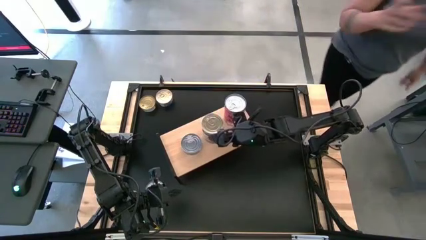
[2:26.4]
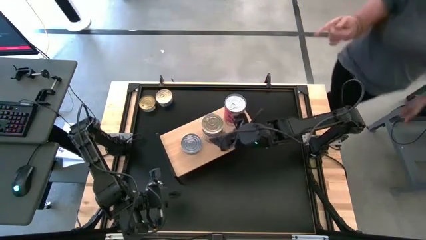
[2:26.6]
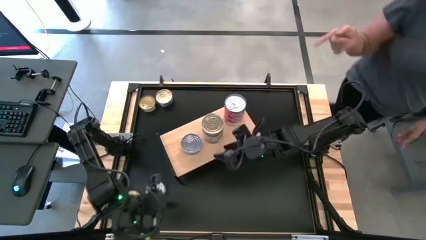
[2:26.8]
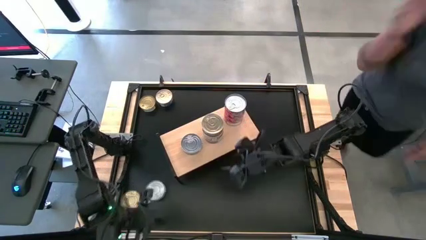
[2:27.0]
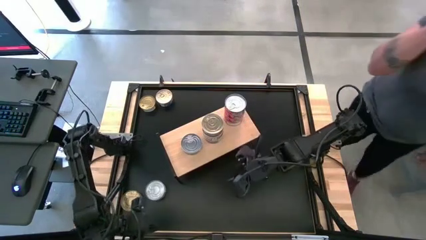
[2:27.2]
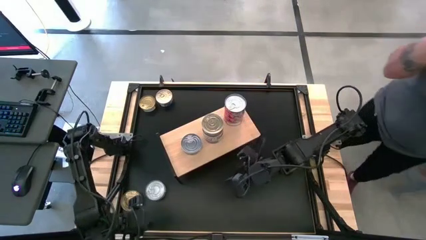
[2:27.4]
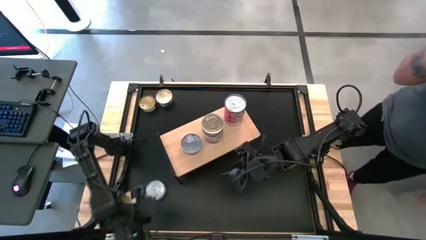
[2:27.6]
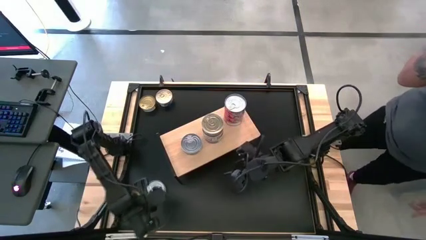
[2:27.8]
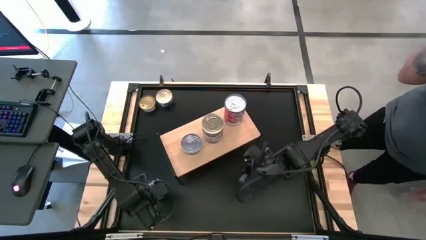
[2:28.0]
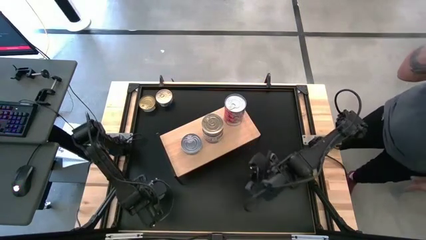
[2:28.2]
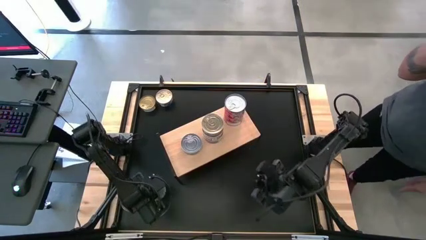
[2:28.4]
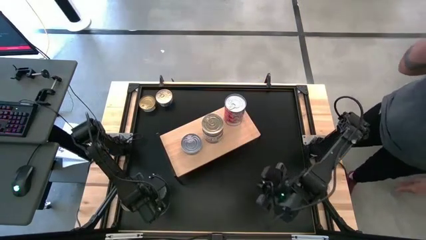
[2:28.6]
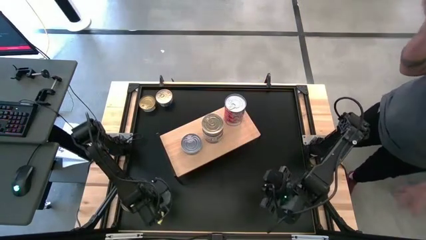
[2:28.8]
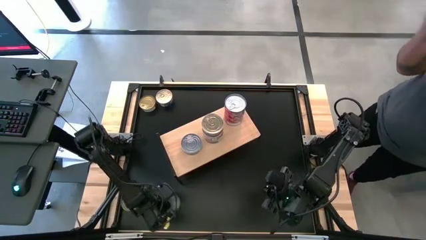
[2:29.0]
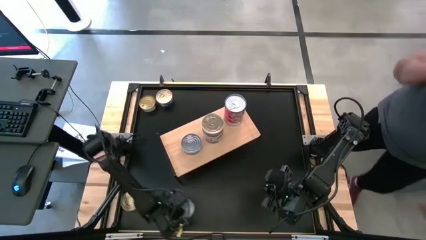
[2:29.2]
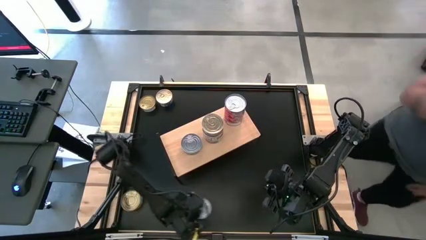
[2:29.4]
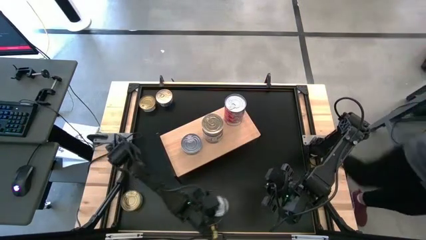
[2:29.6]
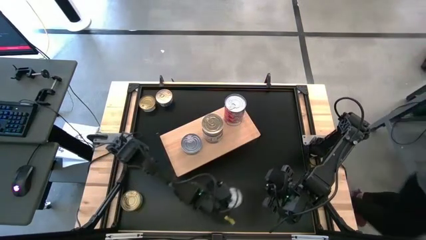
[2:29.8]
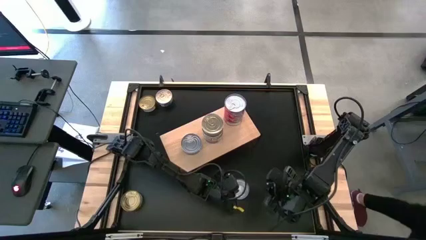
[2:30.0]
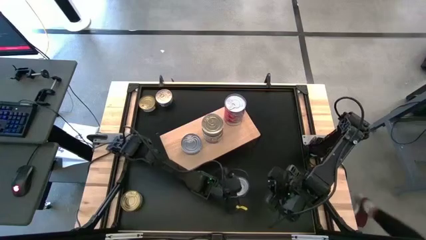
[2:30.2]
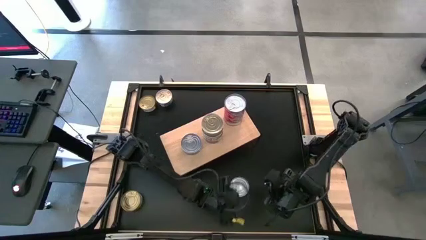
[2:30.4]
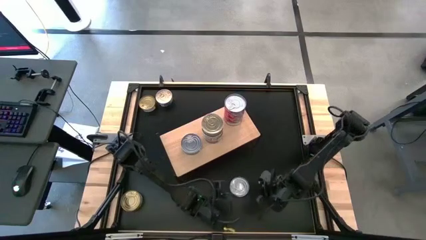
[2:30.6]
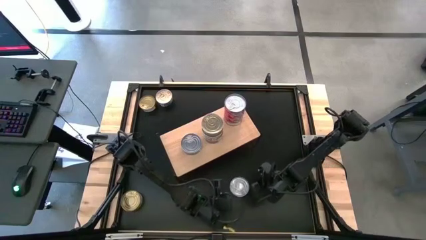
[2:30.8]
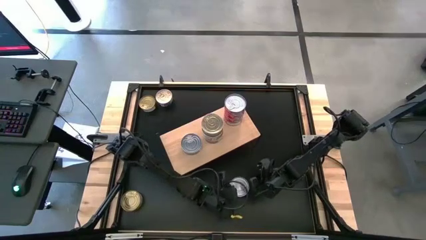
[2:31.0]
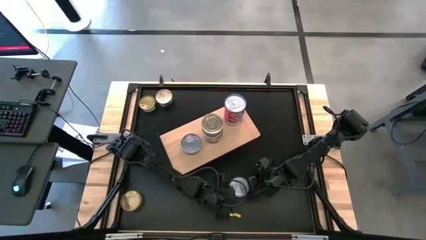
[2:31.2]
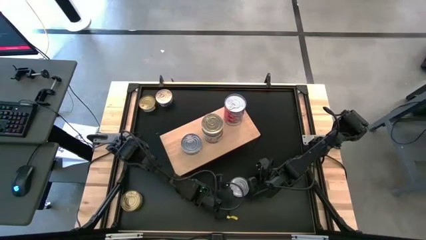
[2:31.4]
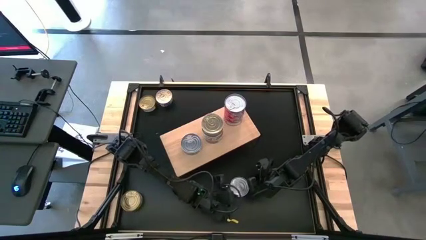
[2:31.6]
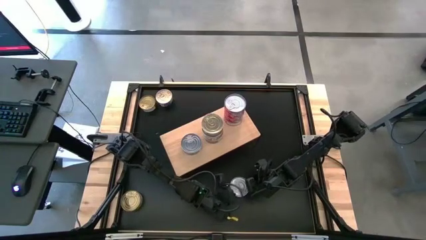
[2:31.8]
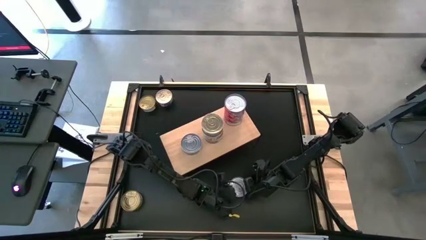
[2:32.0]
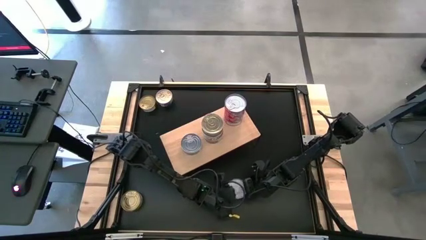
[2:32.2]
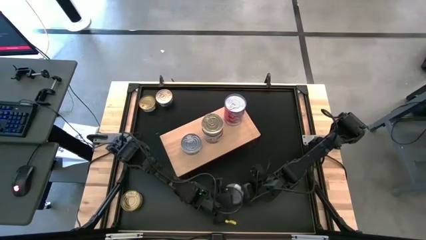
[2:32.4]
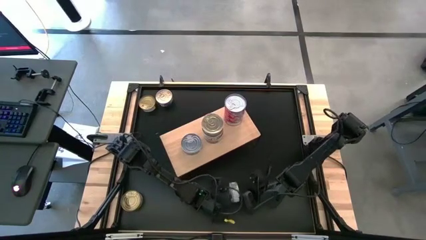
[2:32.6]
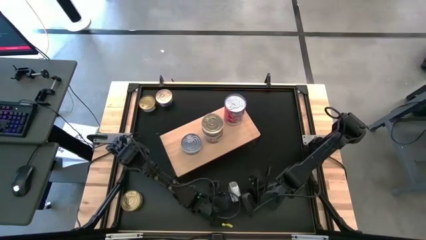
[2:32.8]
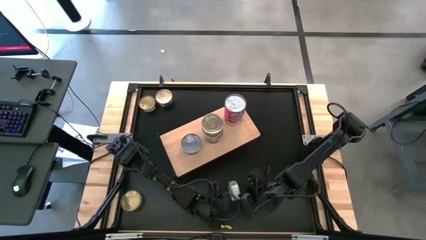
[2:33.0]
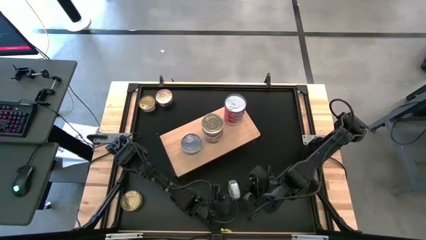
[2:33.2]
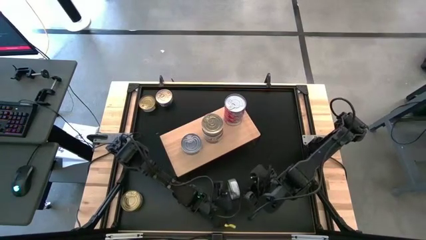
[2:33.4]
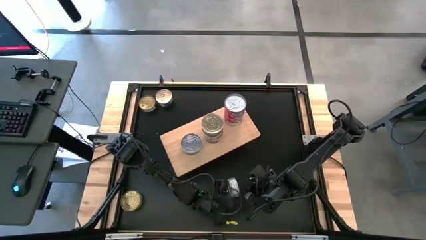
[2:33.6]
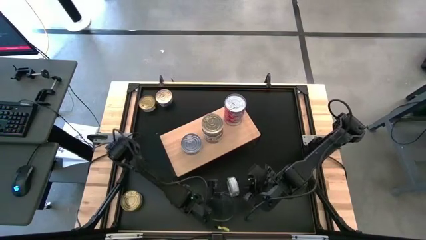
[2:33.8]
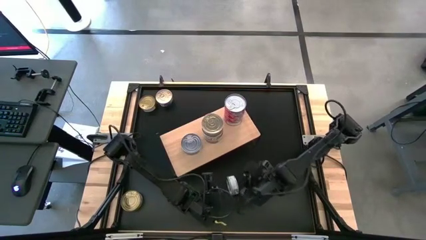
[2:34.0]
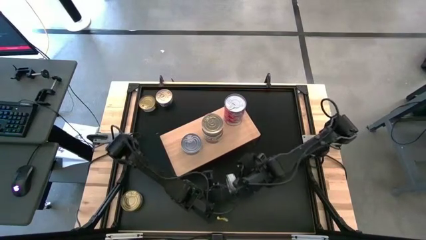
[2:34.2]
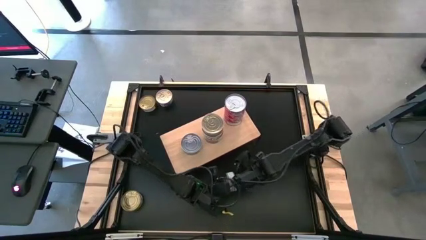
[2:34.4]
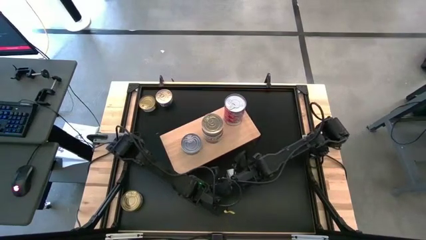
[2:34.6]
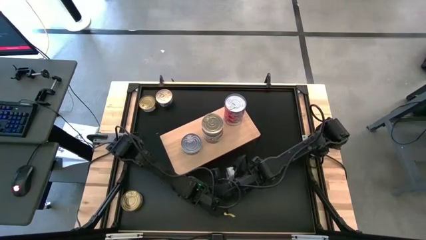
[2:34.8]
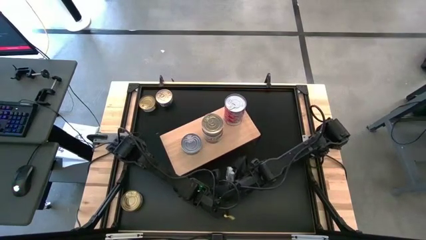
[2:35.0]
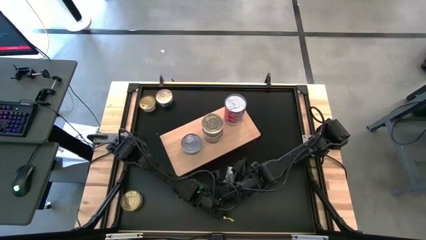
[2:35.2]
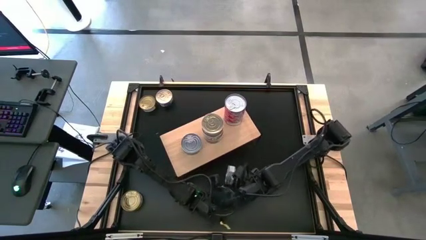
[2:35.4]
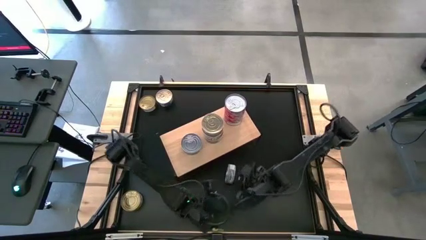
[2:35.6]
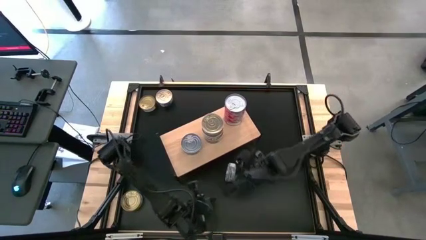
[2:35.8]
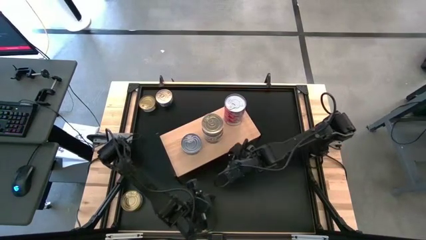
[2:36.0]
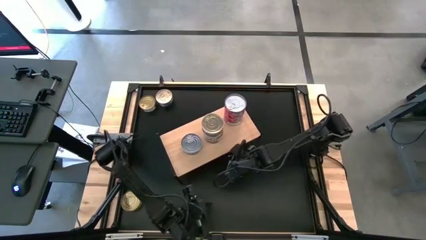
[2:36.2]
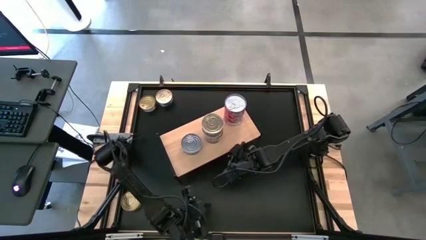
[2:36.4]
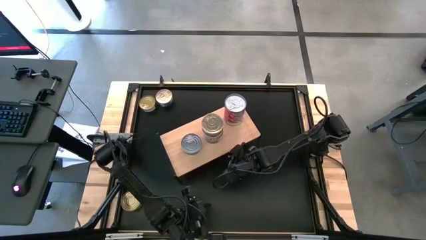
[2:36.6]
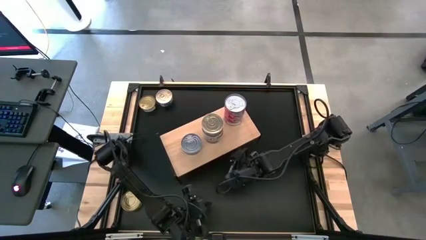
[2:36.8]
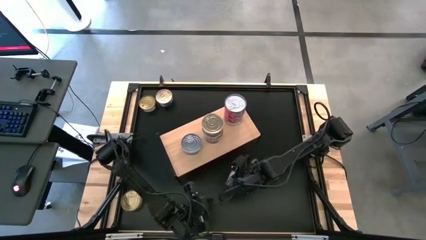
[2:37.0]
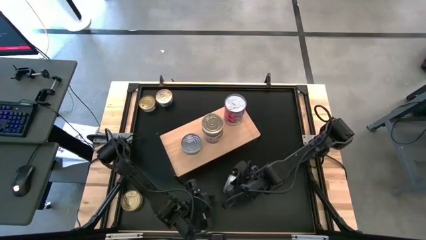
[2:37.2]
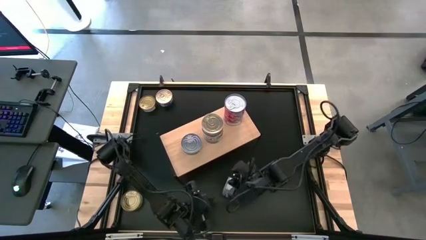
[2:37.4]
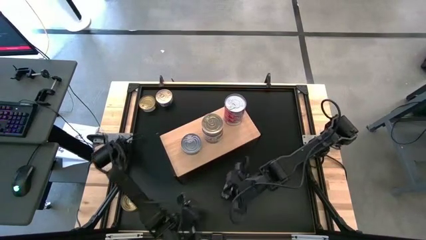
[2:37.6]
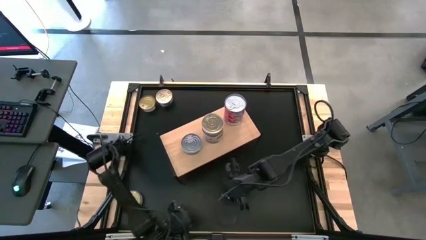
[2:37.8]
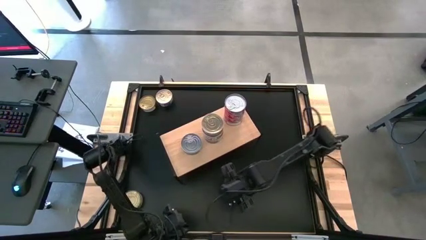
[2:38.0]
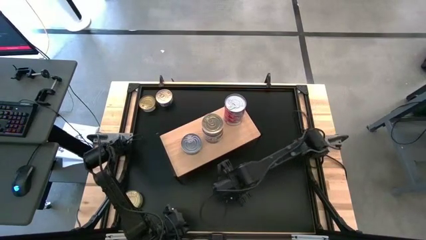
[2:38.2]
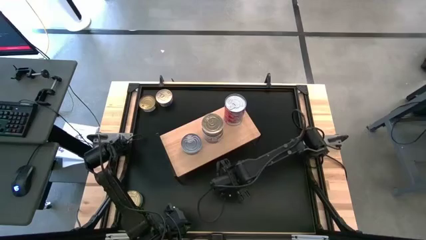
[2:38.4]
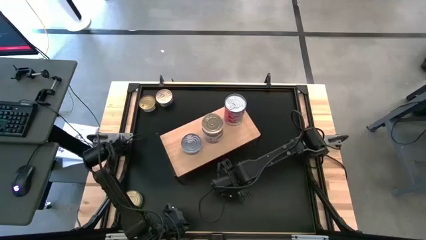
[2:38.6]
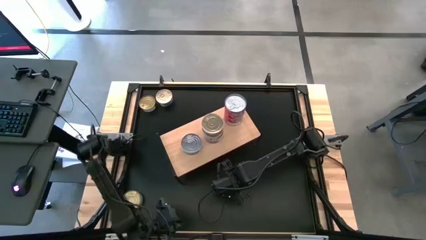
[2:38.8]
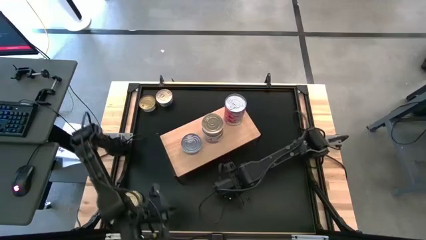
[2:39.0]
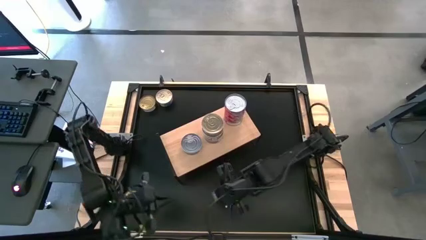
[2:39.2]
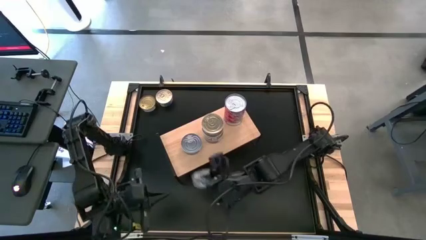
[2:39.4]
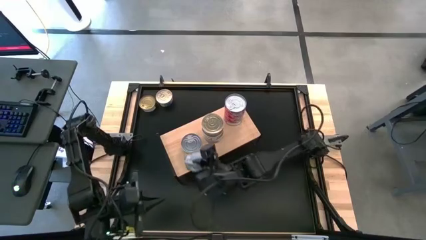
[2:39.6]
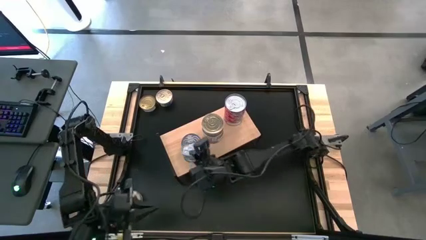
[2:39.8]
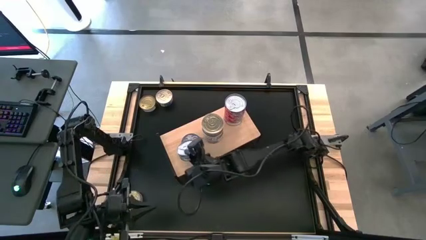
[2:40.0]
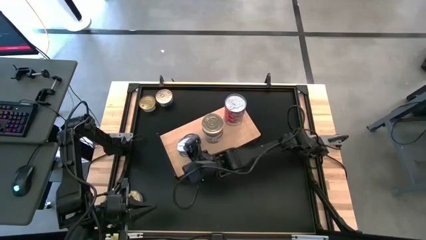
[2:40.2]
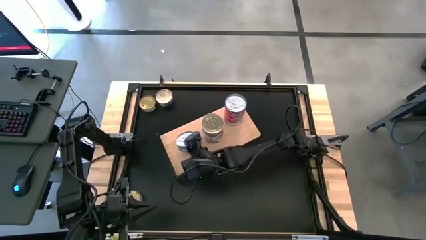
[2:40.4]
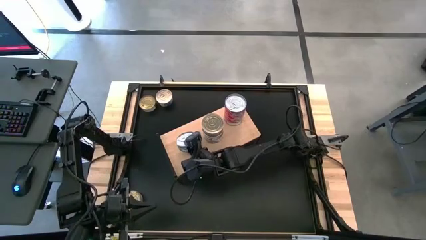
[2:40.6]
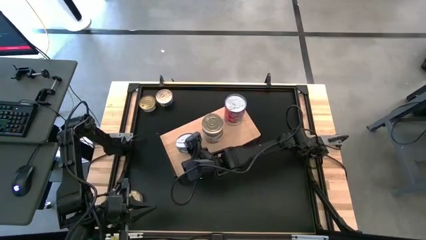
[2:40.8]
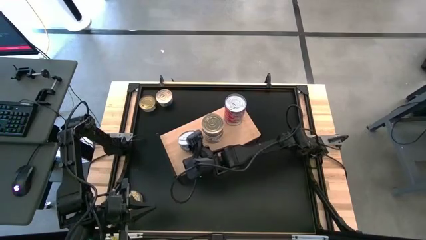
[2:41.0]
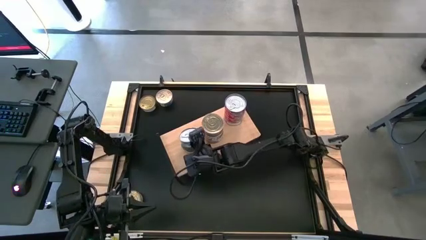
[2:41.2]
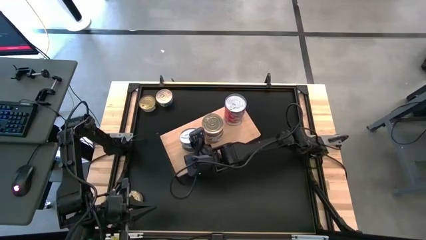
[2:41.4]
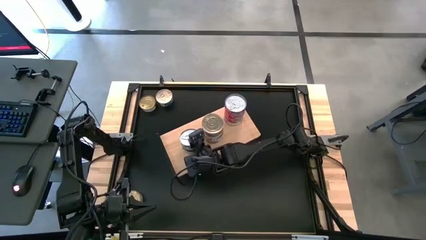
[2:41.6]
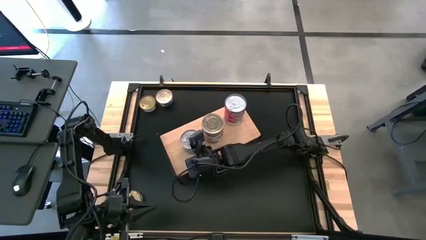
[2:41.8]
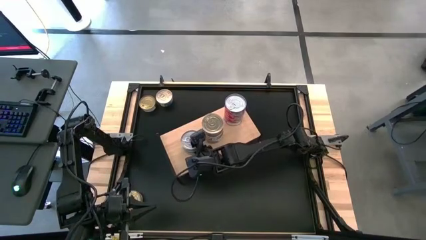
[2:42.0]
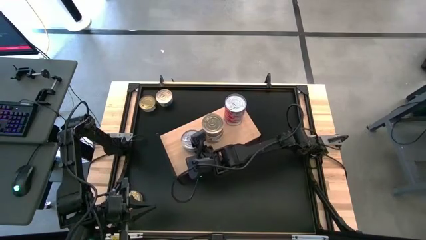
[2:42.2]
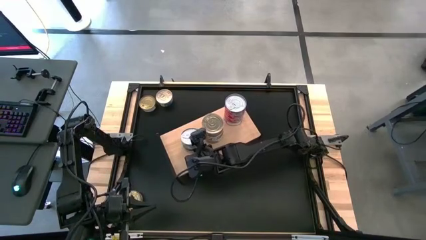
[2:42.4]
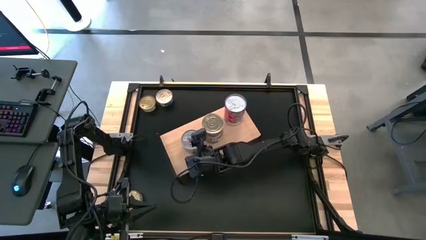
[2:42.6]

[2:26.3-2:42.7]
Task: Stack canned seafood by type on shelf
Stack the green and white tuna on the top of the other green-white tuna can on the shelf

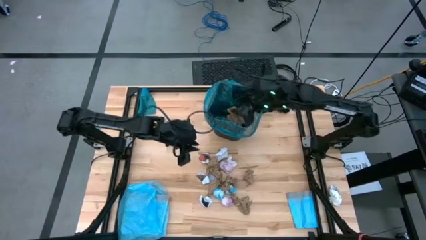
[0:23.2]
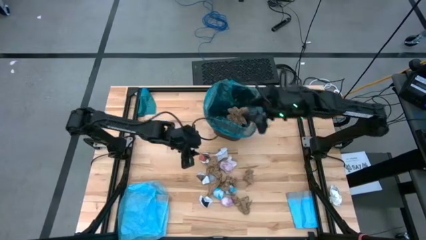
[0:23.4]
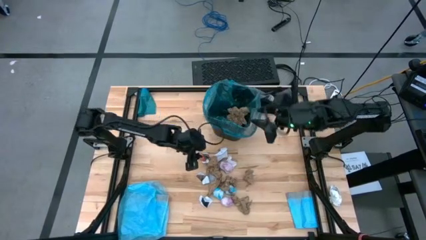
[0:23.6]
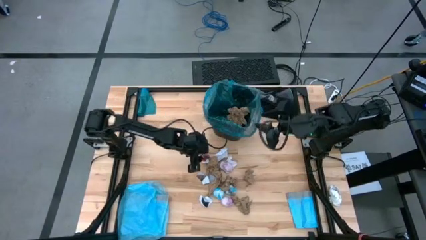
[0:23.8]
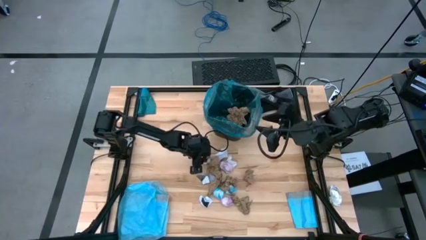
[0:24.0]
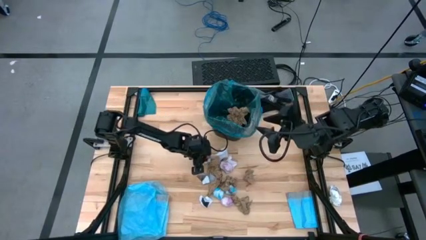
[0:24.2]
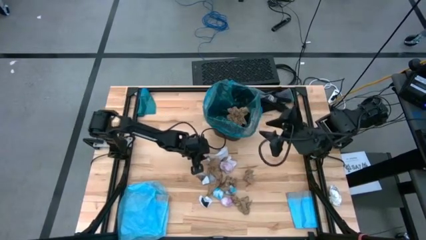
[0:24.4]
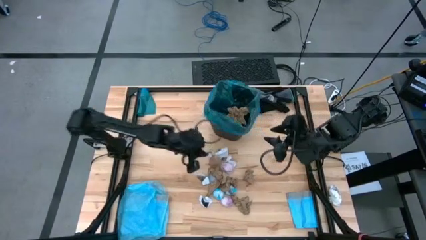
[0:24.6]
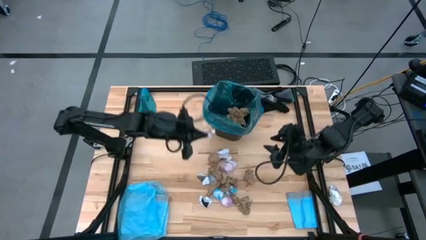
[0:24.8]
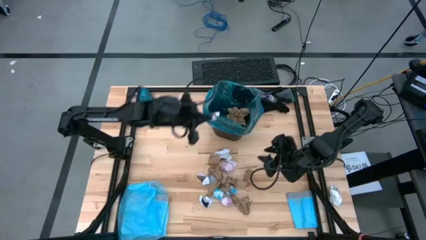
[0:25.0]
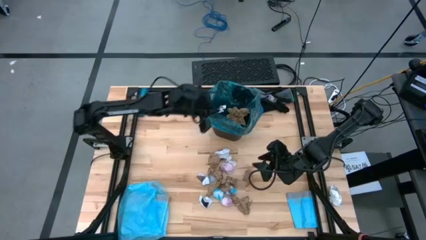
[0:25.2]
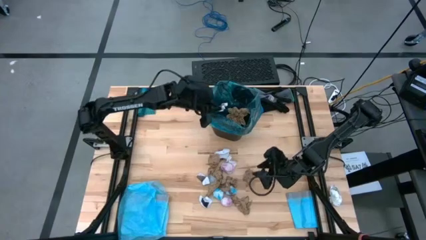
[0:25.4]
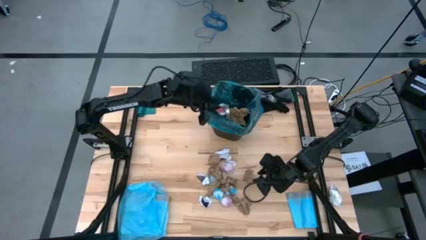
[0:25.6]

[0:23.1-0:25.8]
Task: place trash/remove bag and relplace
Put the white paper into the blue trash bag inside the black trash bin
